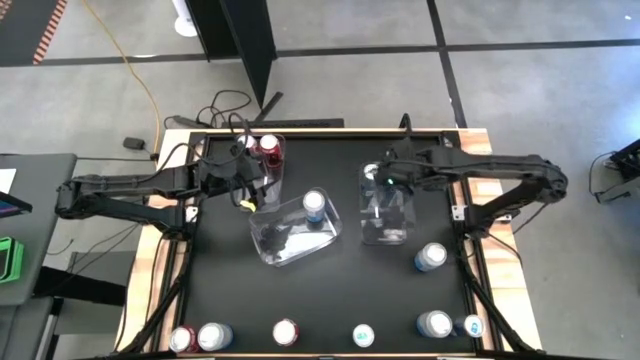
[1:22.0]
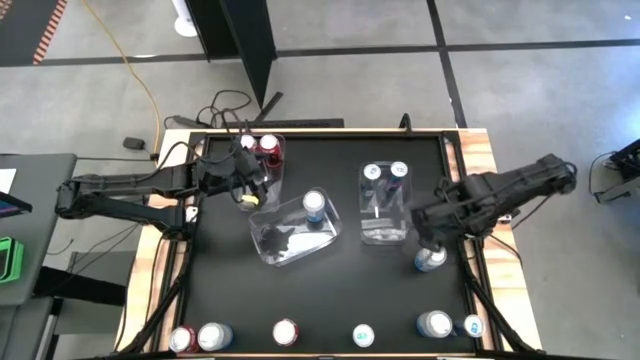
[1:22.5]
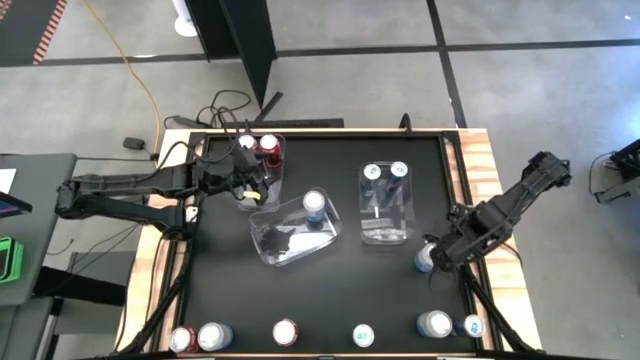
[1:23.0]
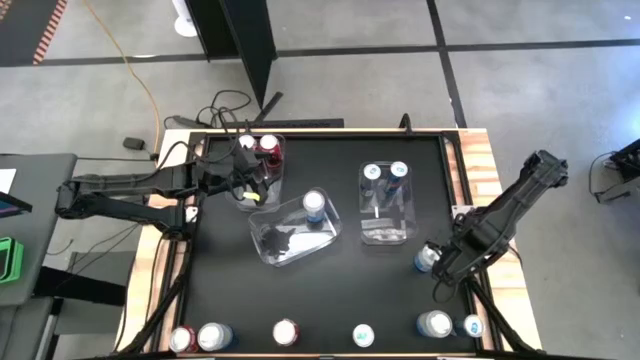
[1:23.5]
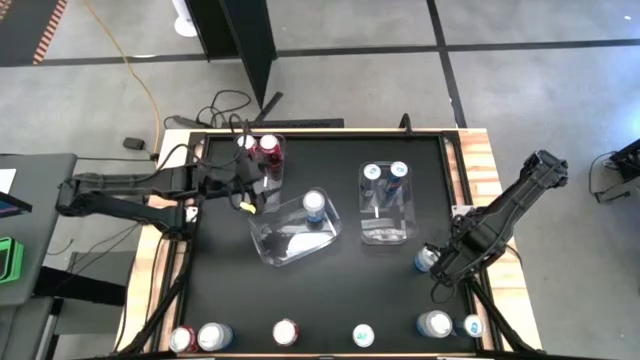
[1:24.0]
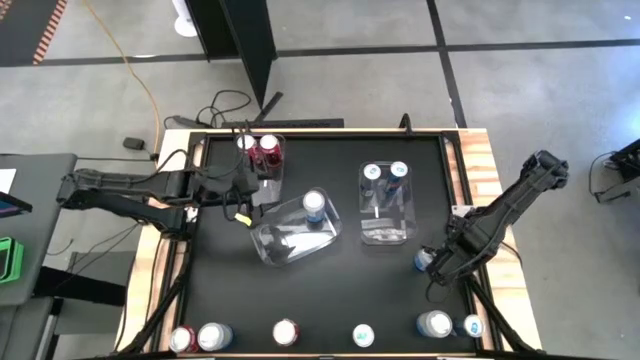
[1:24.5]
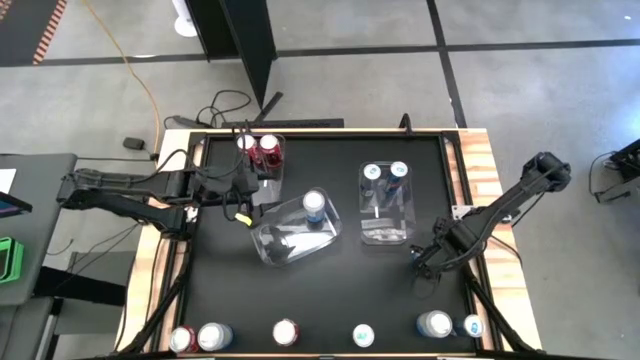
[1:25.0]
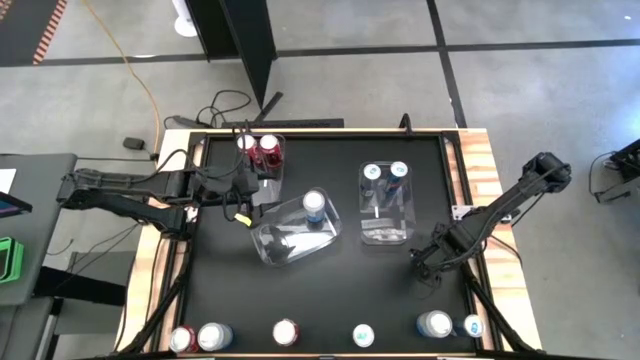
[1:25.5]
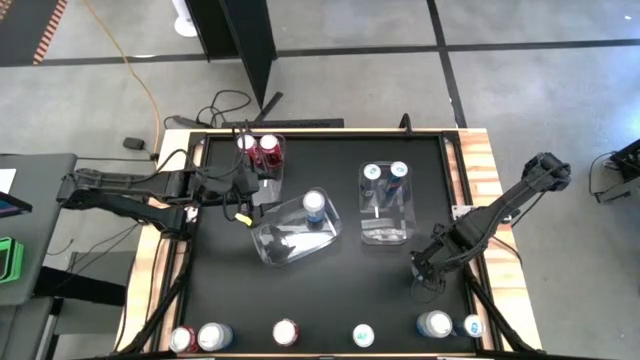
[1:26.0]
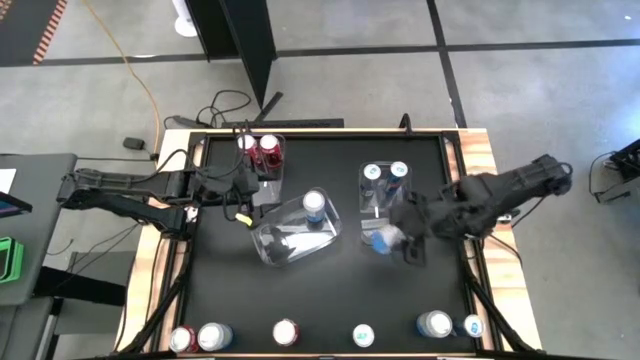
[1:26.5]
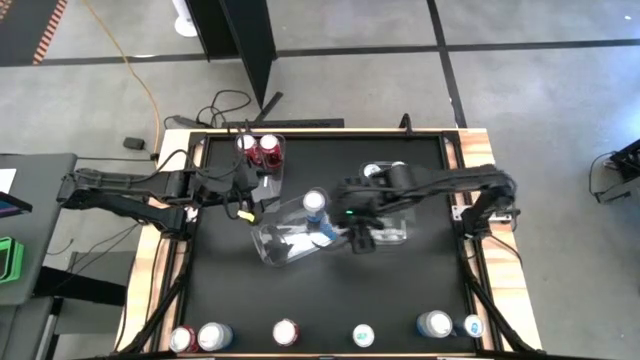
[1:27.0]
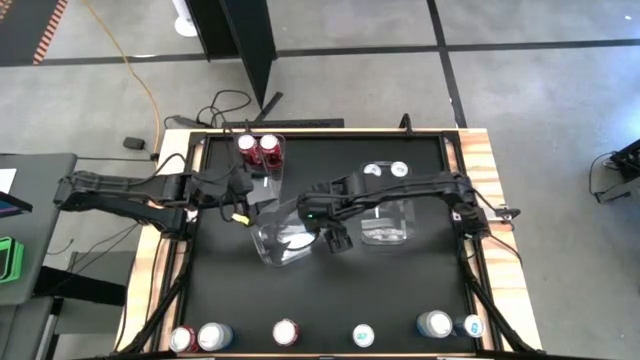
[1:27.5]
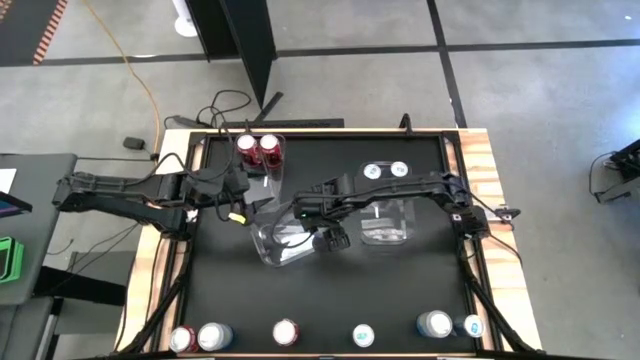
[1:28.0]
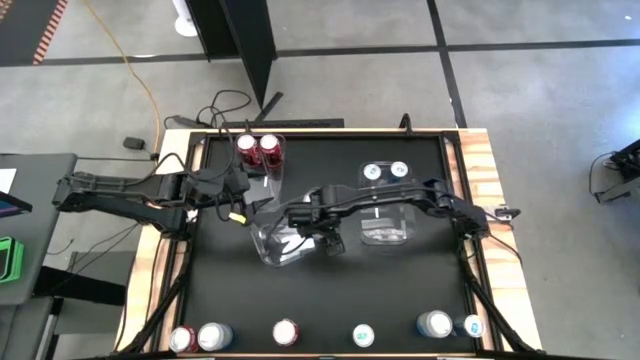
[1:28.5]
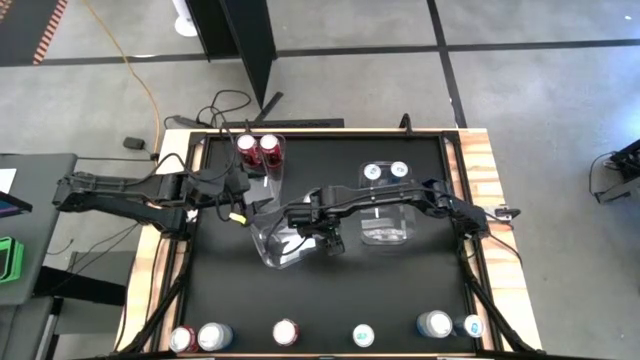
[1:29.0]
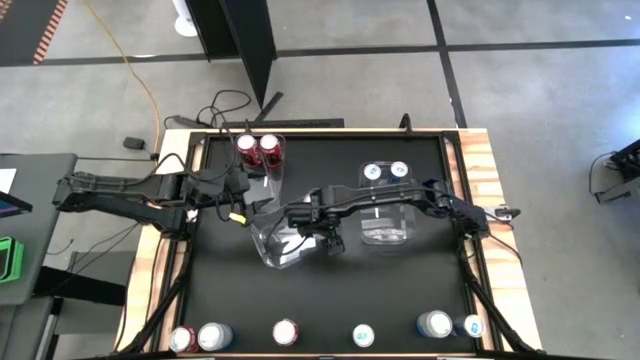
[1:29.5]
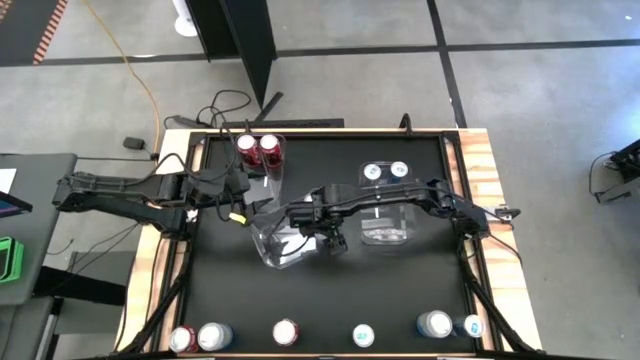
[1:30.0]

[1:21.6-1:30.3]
Task: Sort soda cans
Put the top white blue soda can into the middle transparent bin

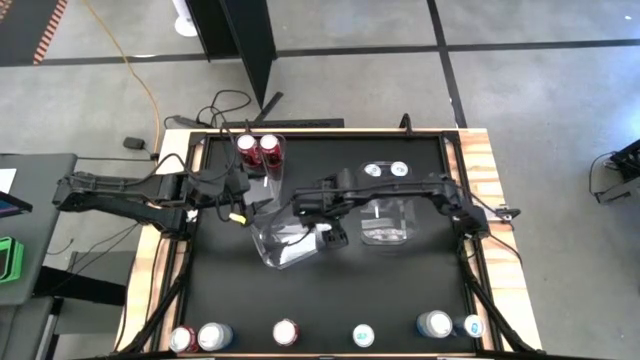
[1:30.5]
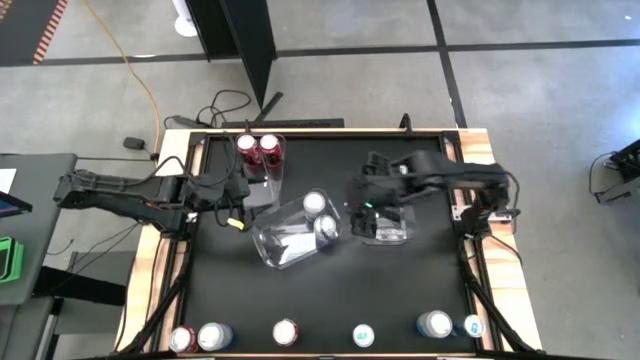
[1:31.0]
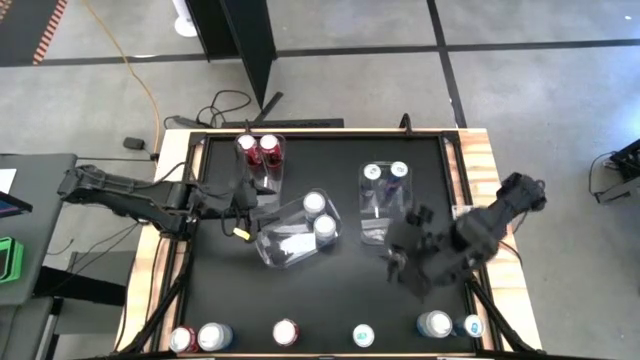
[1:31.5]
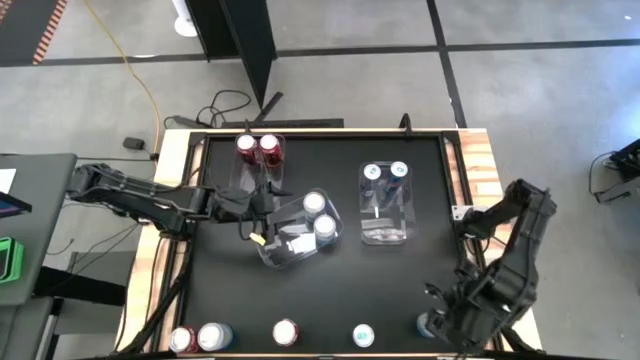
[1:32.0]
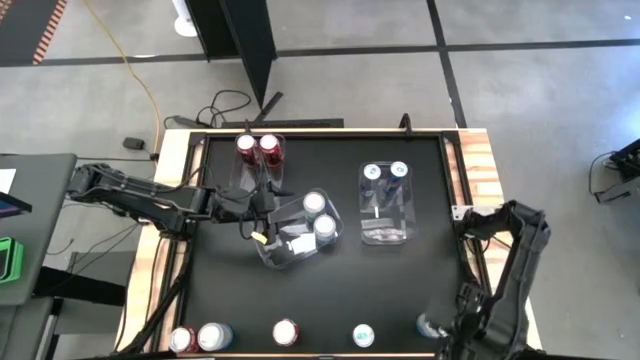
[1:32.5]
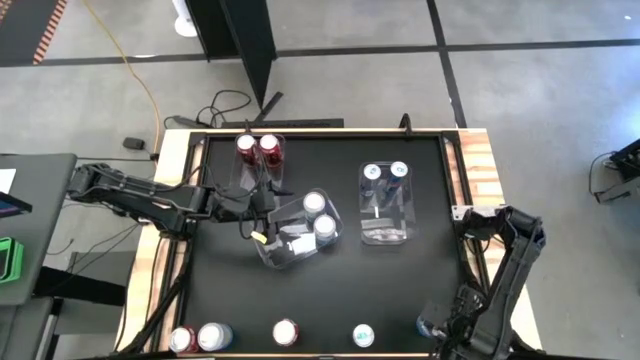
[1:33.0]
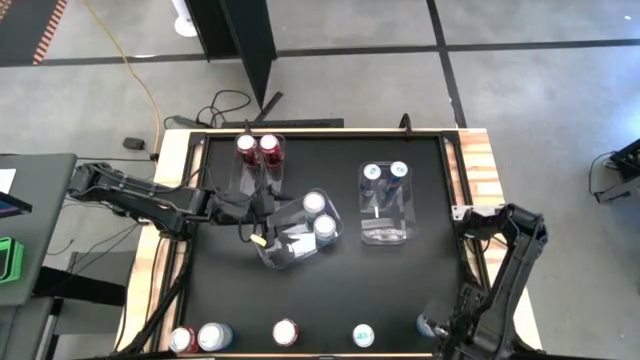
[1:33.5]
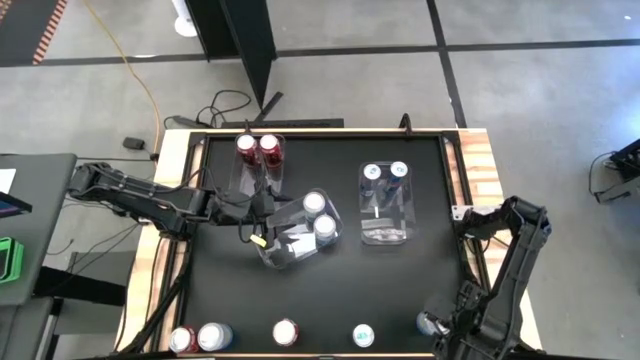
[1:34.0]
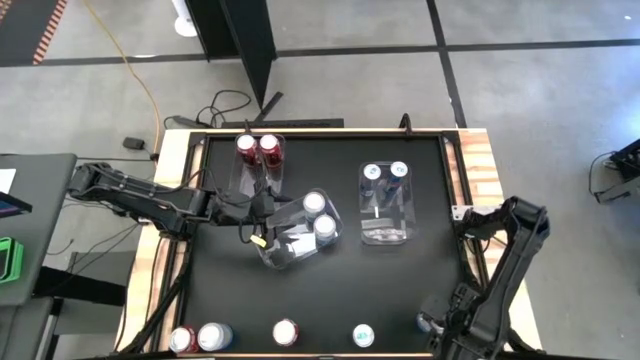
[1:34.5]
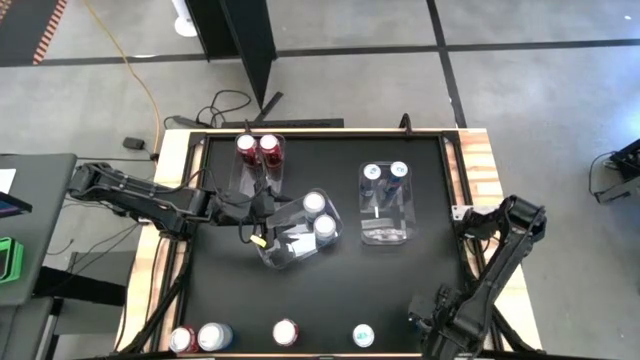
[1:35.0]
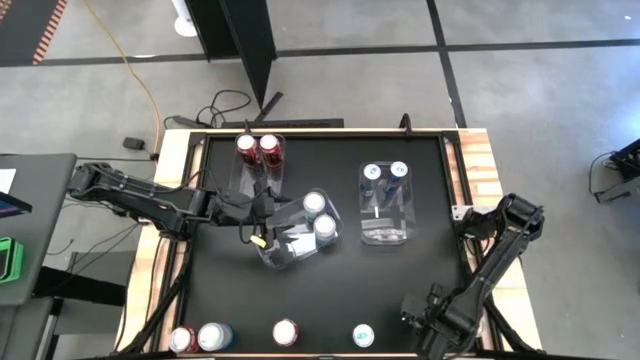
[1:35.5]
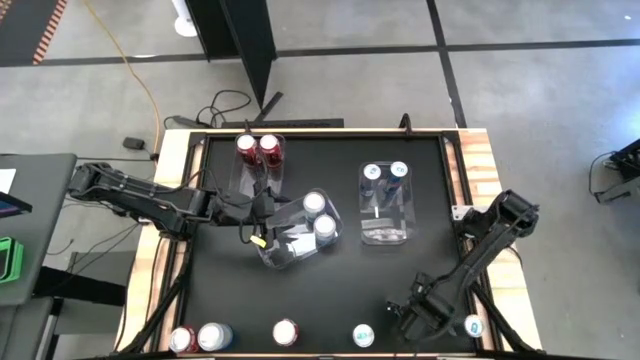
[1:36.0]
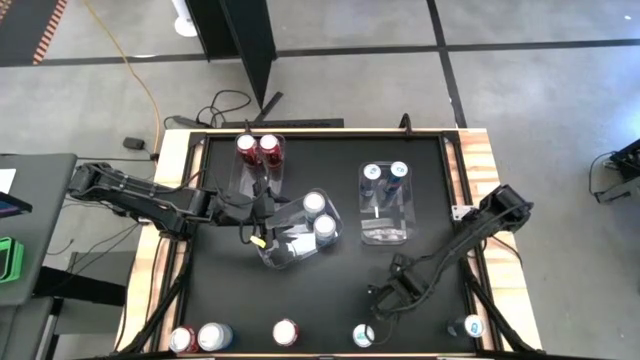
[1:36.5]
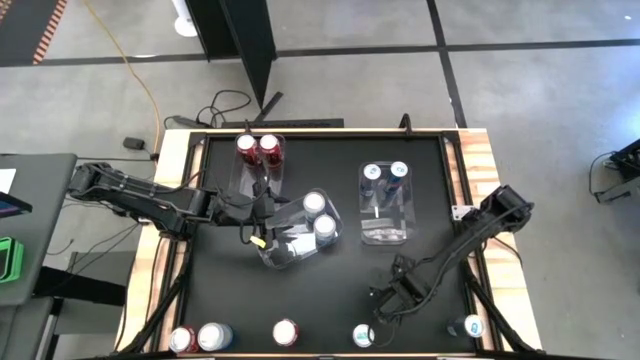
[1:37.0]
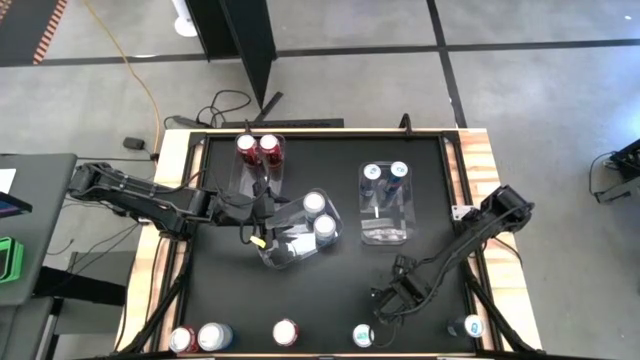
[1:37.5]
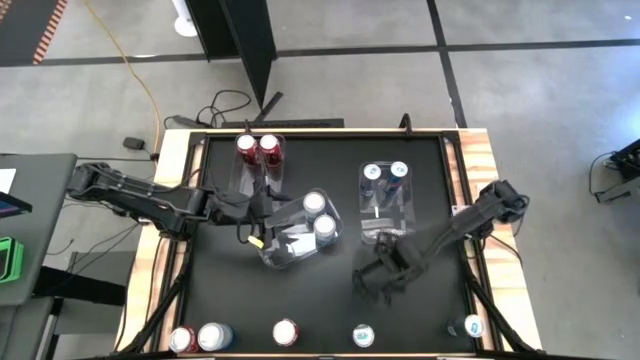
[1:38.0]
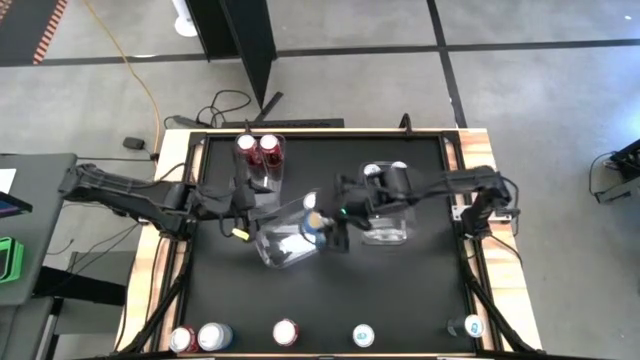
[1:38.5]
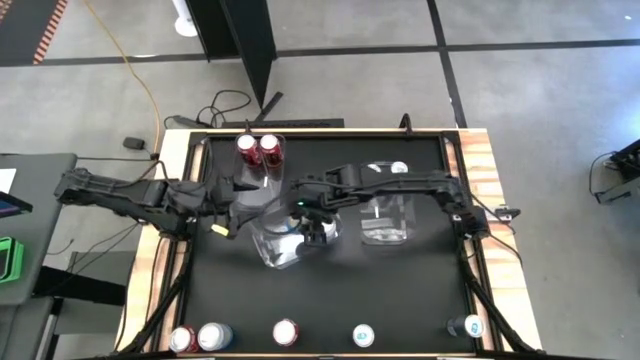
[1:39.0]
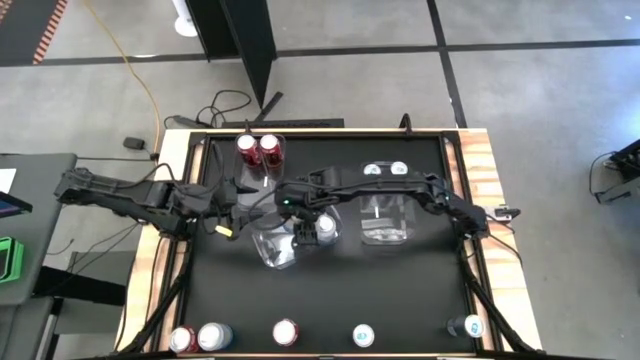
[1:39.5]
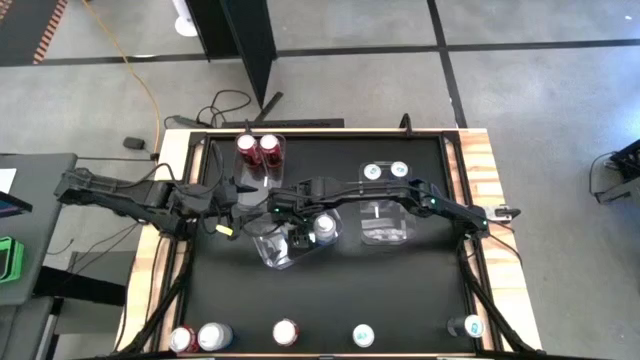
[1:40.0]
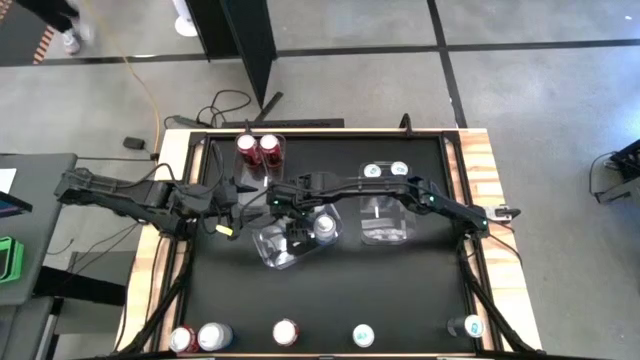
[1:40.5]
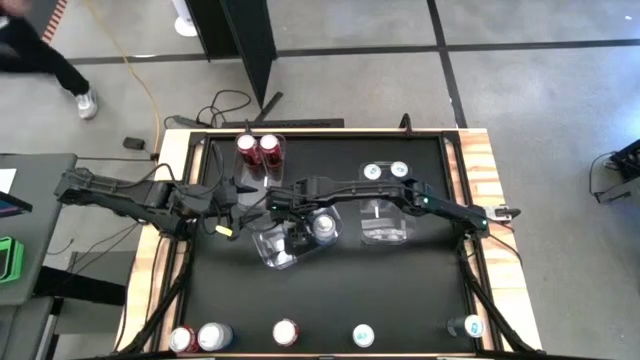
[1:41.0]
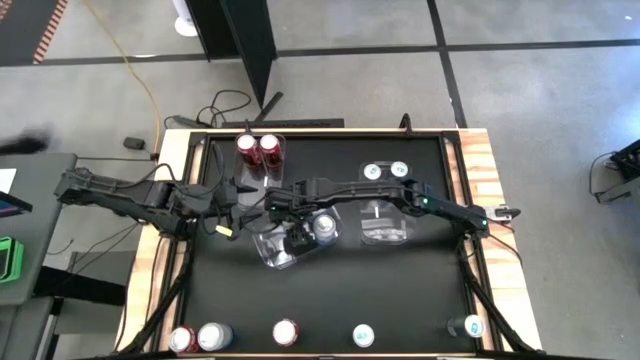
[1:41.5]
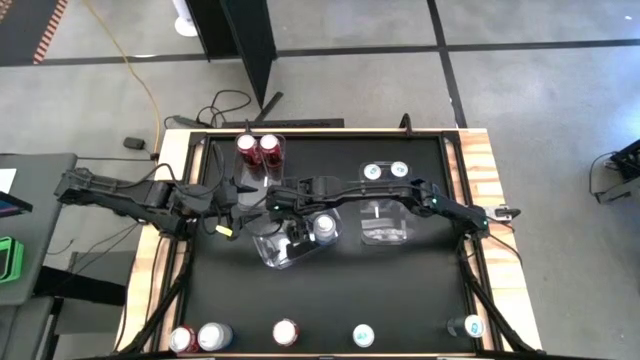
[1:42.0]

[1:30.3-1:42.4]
Put the right white blue soda can into the middle transparent bin
